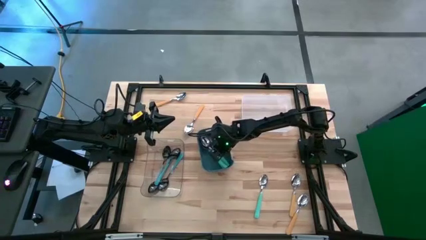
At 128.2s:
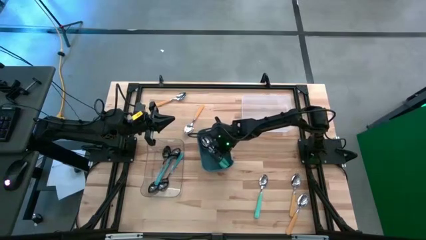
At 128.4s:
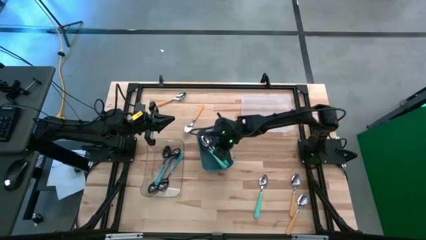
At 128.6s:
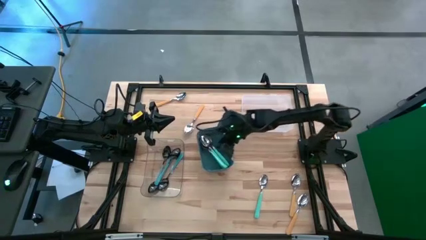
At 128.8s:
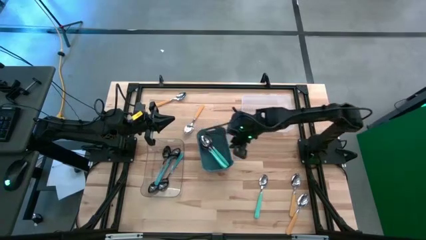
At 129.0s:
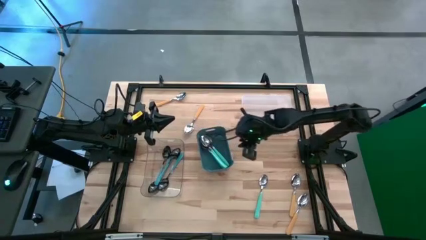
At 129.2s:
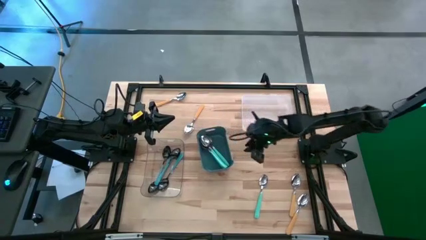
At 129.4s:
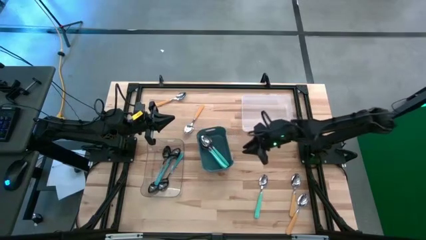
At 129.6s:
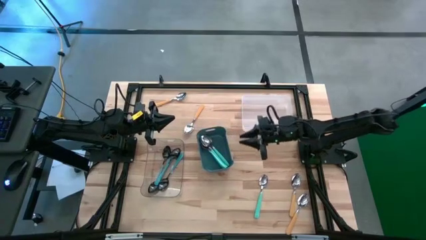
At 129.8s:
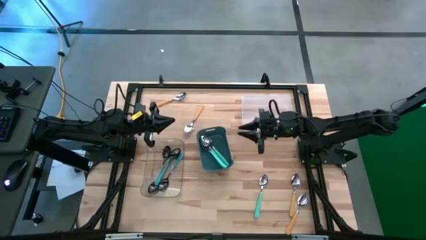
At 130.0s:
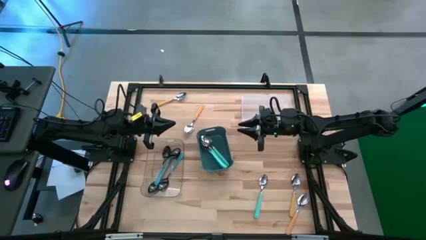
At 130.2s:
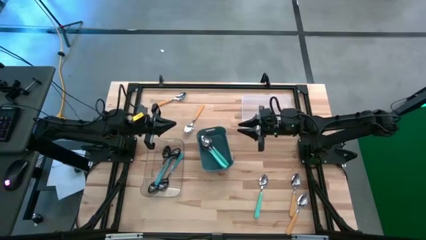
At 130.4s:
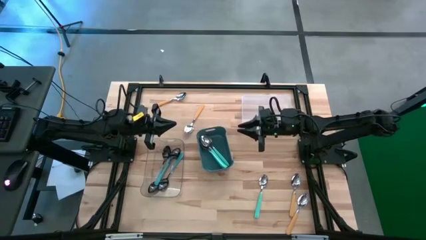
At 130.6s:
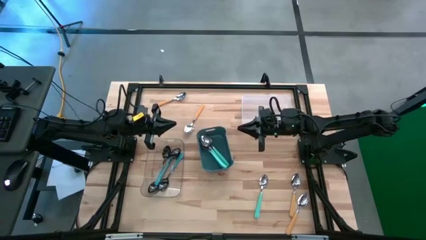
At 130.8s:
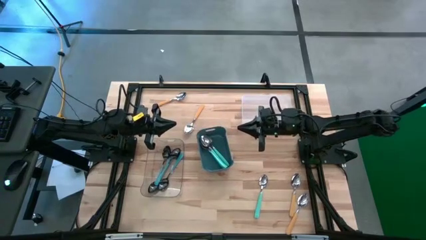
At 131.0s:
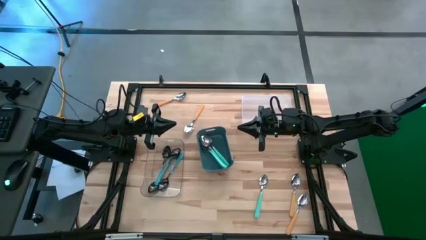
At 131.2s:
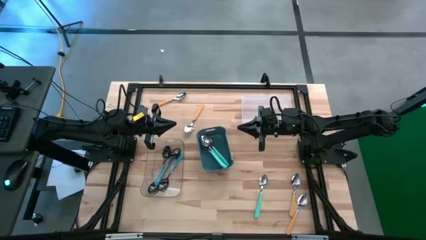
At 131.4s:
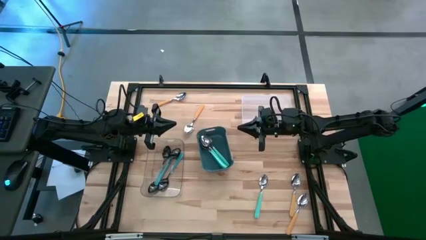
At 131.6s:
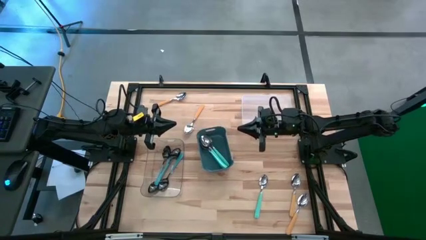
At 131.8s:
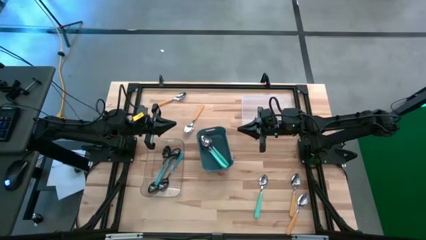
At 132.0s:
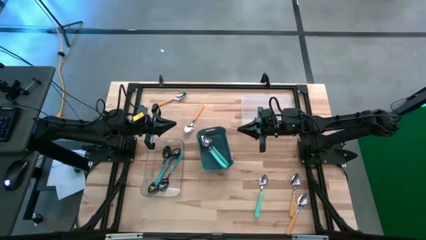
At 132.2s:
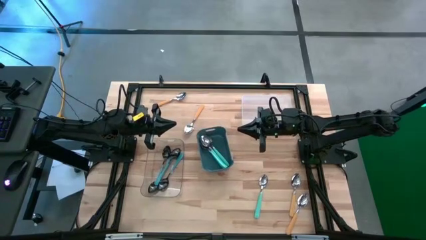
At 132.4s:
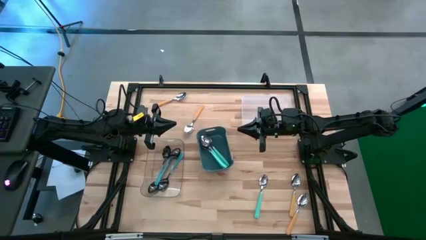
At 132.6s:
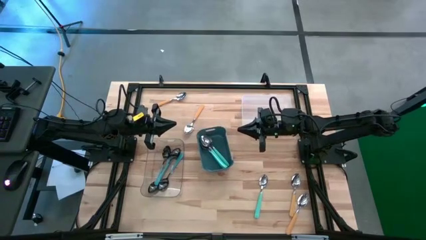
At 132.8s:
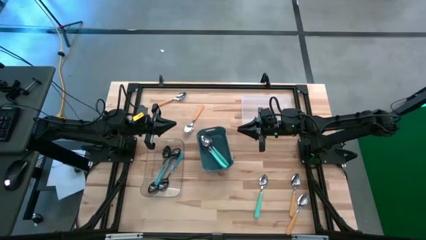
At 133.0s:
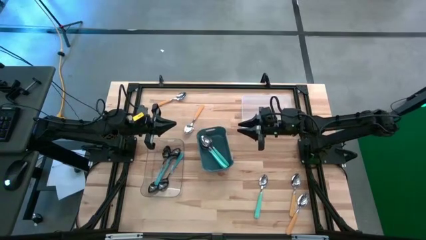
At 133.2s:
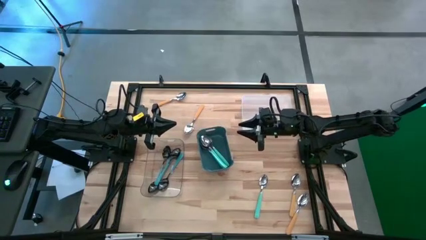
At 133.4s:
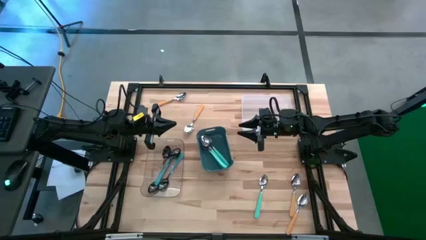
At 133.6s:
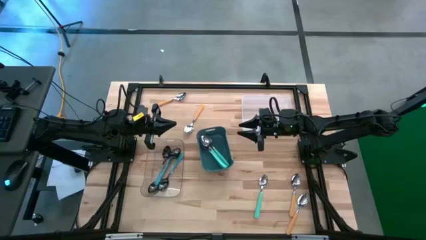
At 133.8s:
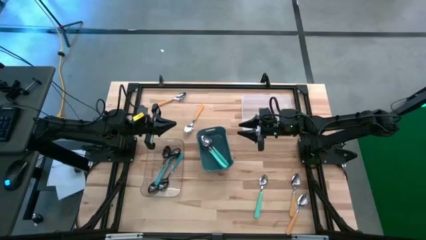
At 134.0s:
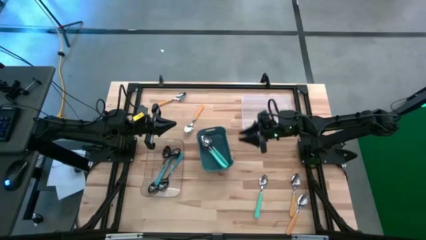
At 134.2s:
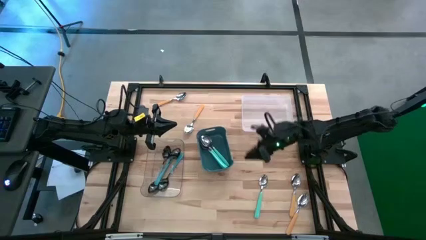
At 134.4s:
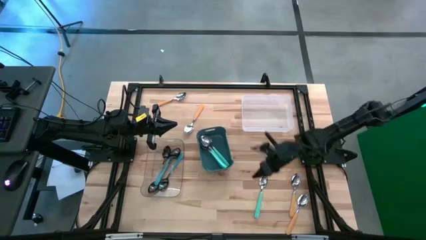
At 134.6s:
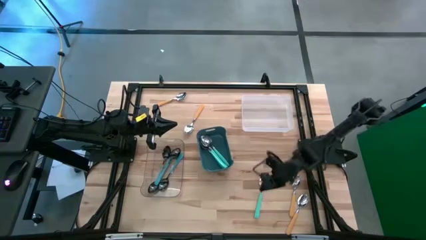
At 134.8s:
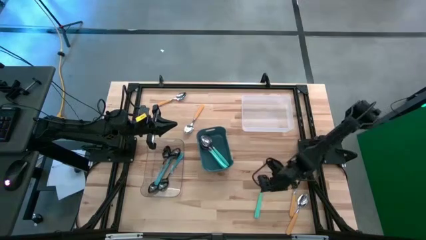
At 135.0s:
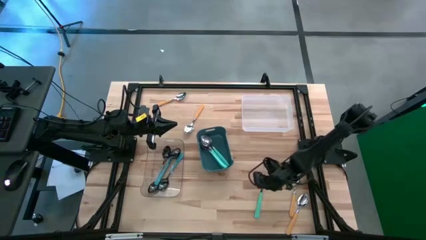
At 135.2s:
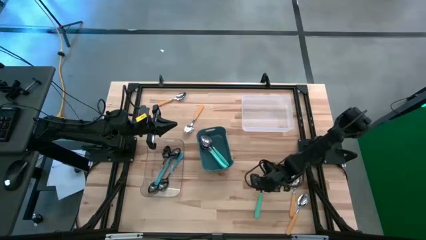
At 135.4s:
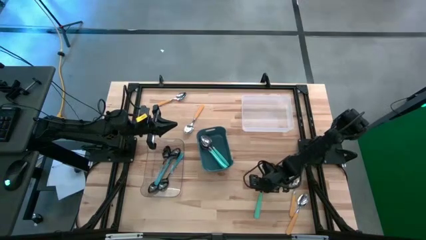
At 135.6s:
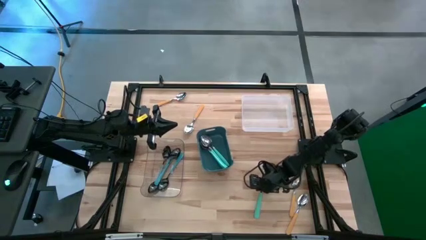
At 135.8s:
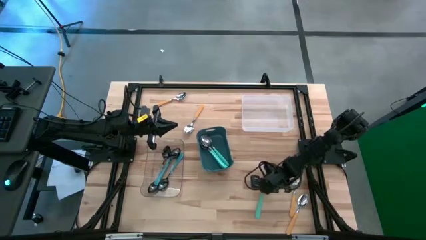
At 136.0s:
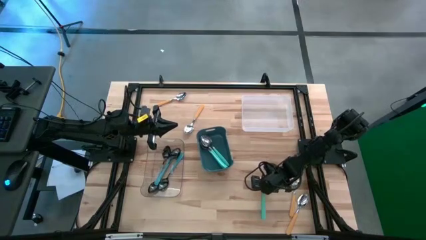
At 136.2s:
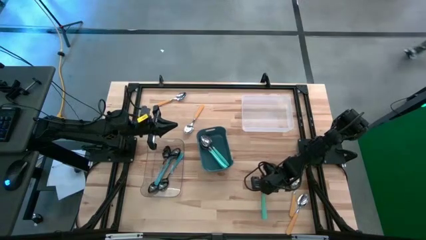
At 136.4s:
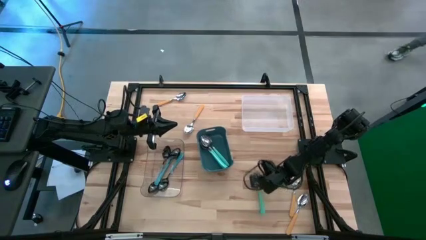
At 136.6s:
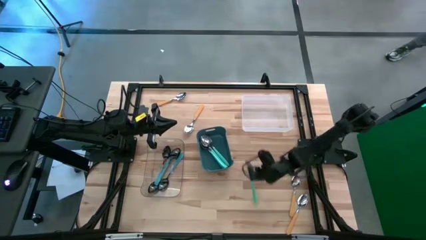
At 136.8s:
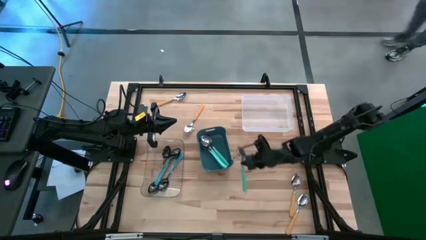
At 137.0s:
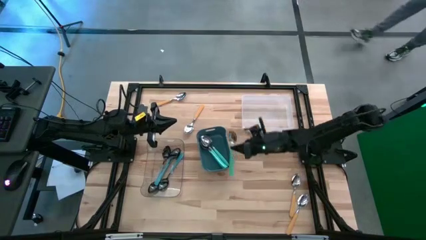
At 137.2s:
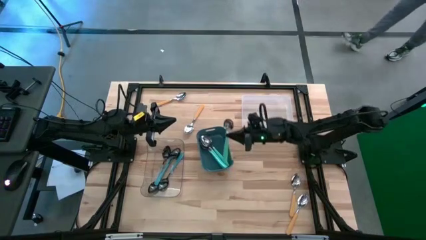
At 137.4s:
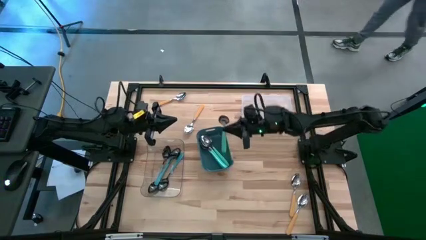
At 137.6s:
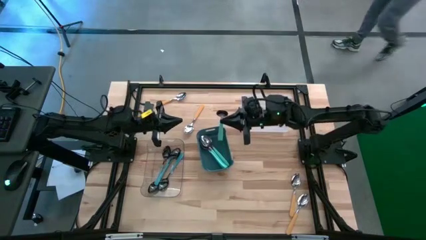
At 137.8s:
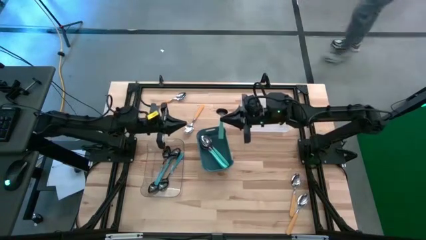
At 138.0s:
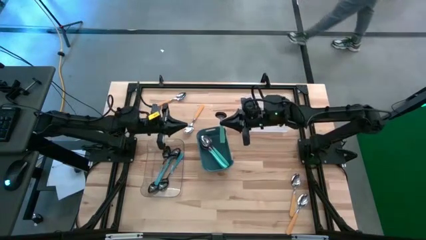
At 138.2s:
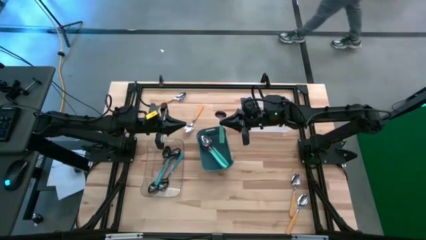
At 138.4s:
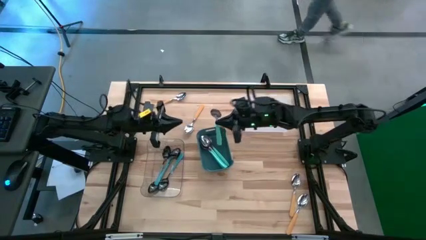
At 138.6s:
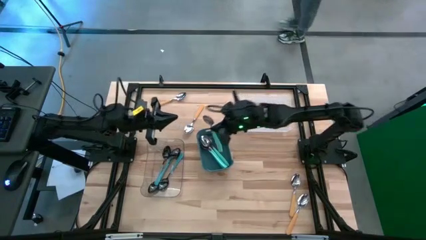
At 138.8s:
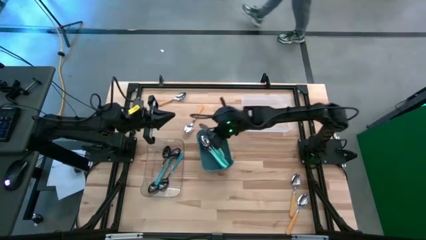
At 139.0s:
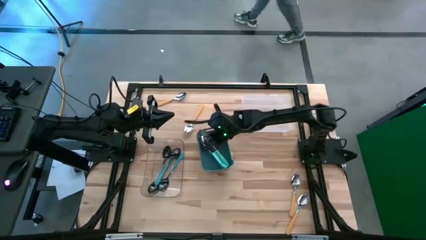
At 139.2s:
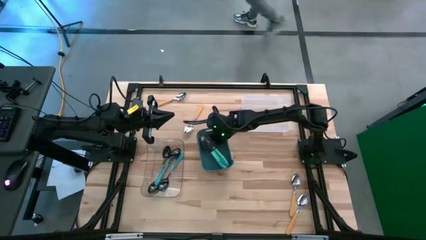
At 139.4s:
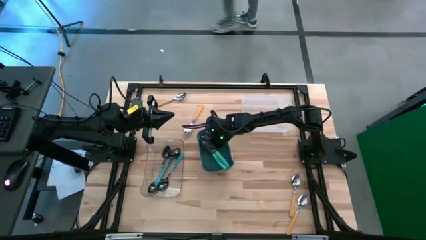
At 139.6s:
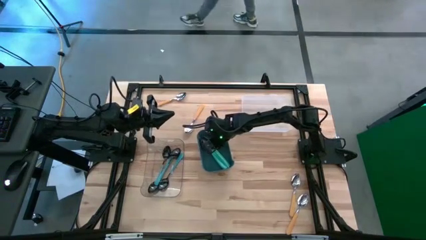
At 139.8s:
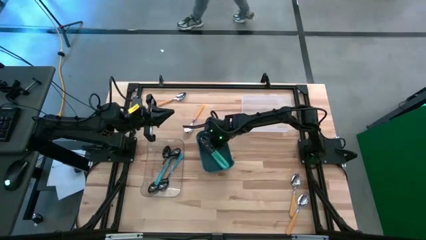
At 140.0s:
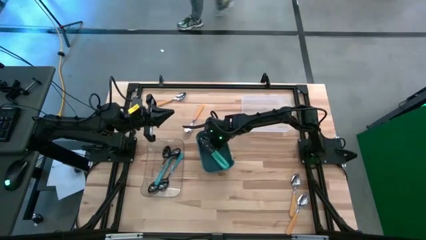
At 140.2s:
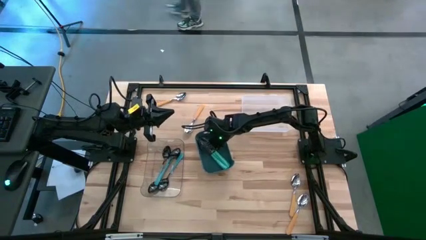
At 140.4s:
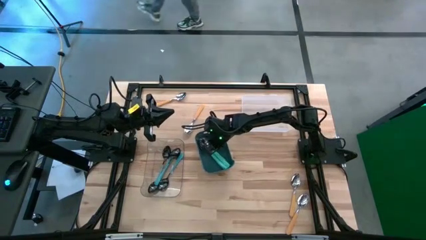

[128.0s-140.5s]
Task: Sort silverware by color (type)
Put the light blue spoon into the blue bin

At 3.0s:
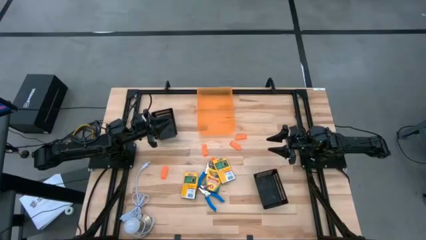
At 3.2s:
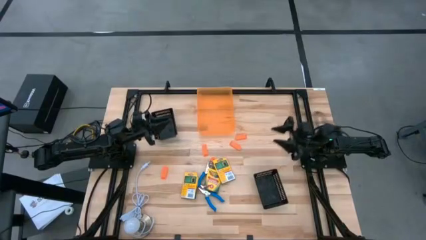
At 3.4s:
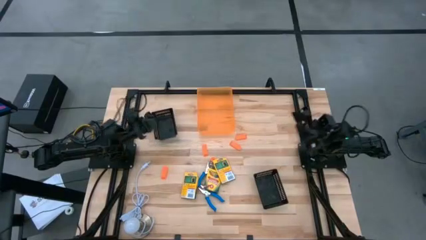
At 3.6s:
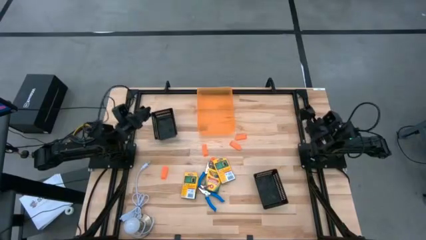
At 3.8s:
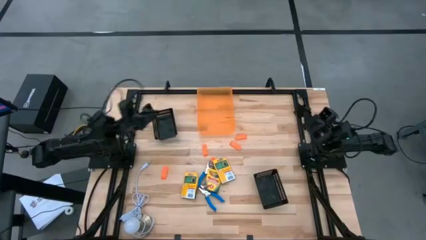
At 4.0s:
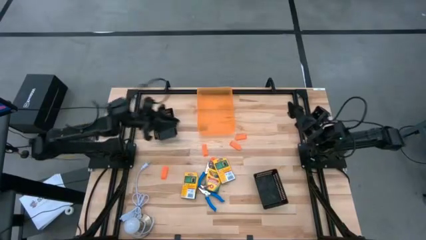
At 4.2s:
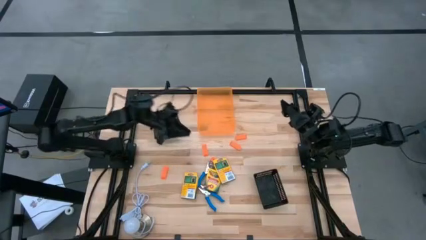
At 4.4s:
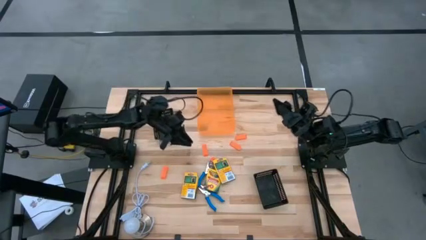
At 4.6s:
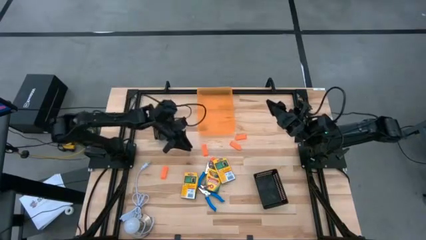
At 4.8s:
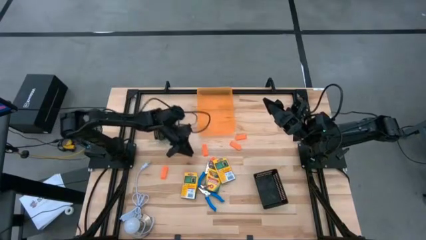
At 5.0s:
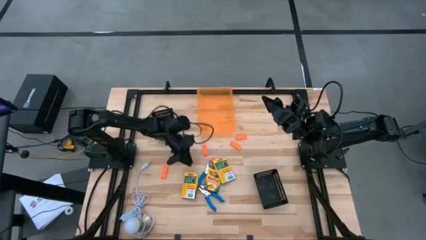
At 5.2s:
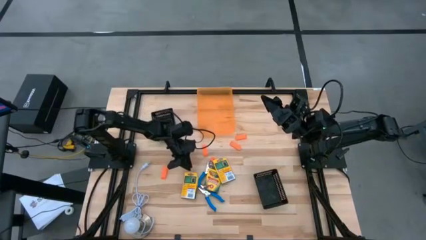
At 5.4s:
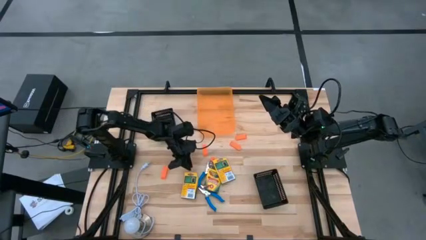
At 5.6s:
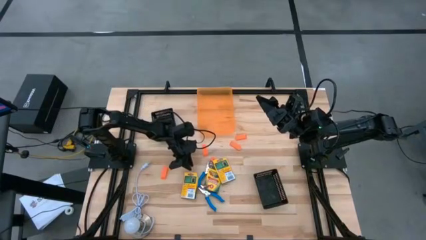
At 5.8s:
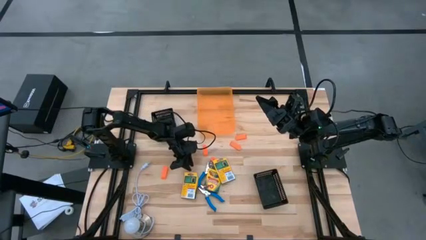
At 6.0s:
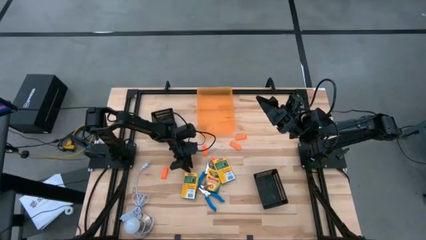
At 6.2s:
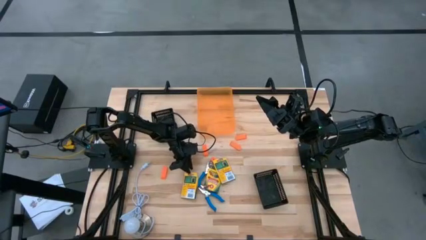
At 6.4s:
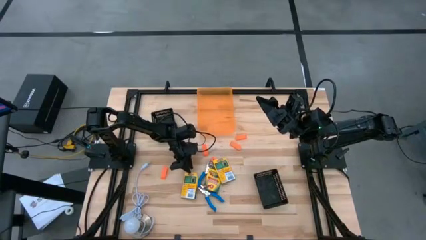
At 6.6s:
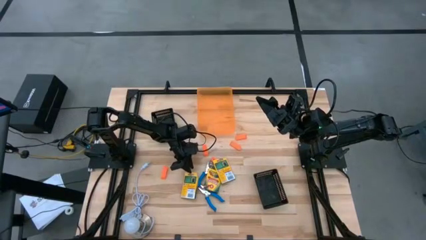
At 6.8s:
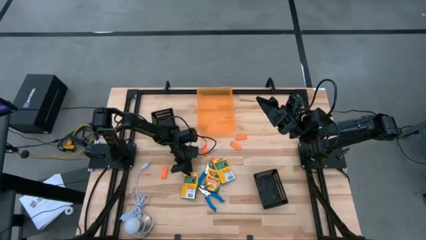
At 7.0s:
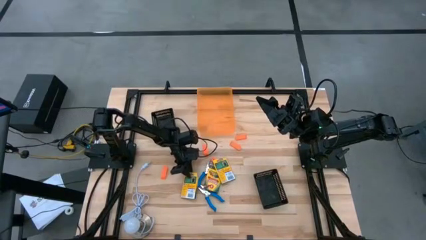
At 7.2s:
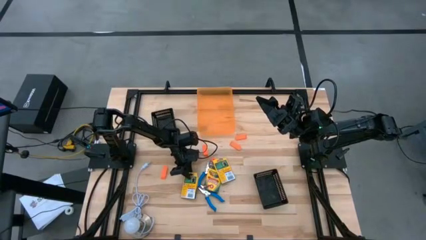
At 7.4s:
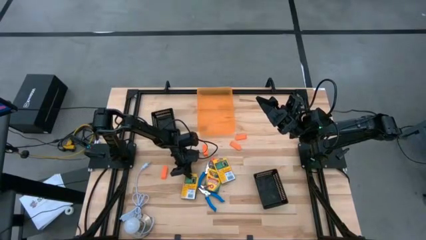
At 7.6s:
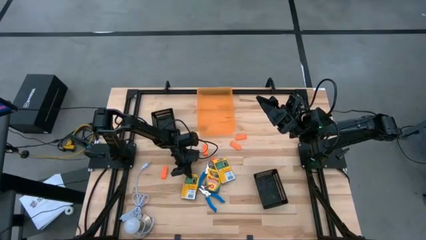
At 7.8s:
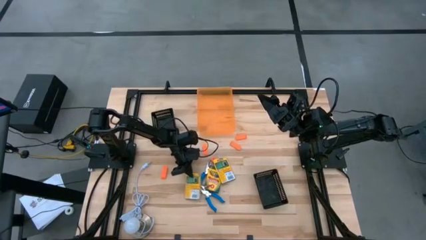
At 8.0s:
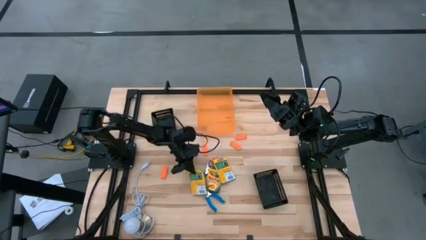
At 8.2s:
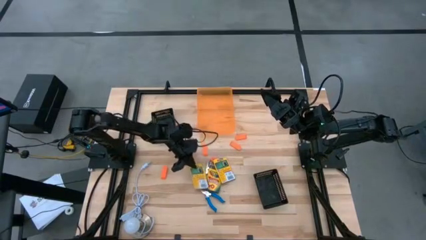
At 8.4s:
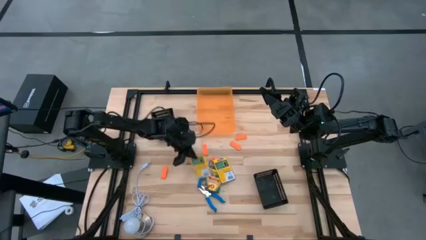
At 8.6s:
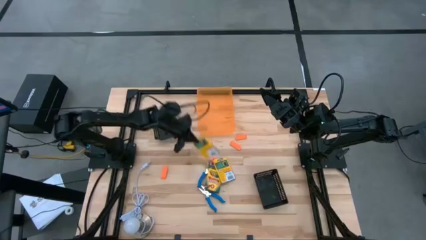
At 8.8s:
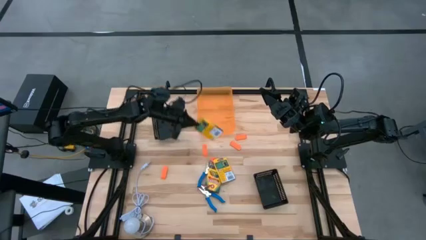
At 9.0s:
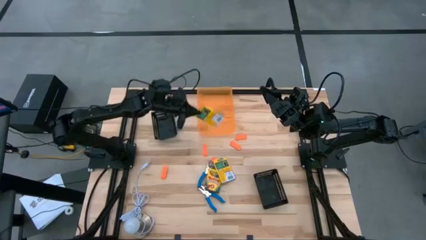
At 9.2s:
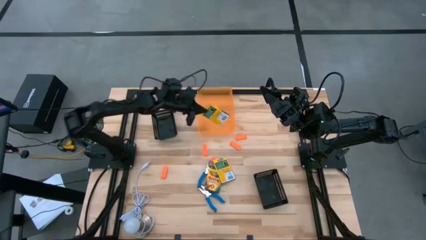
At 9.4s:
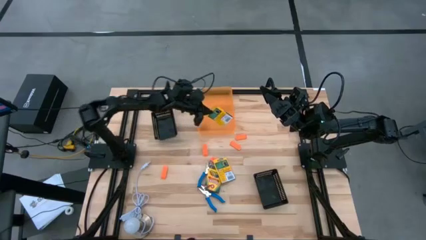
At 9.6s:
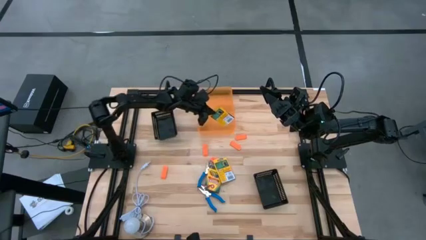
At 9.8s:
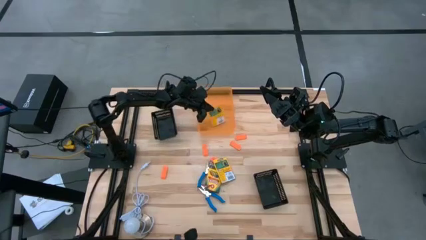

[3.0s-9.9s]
Task: Pick & Place School Supplies
Put the bottom yellow crayon box into the orange bin
